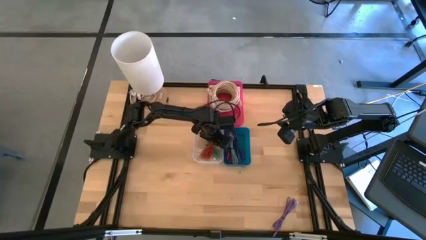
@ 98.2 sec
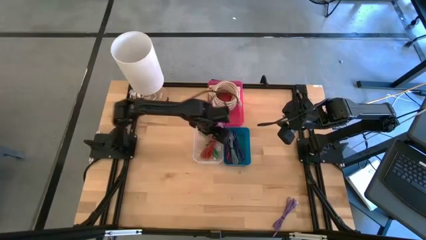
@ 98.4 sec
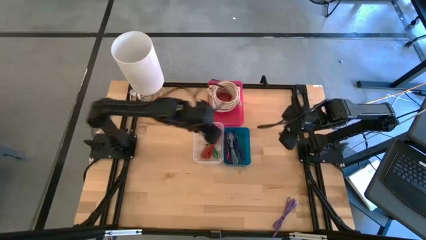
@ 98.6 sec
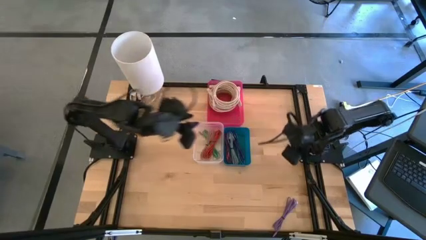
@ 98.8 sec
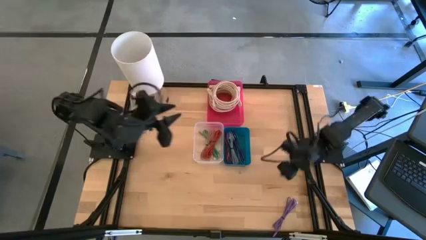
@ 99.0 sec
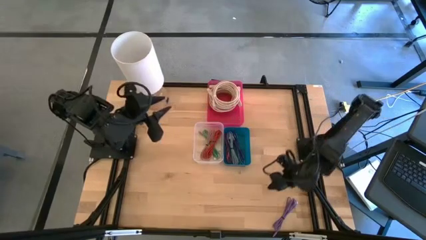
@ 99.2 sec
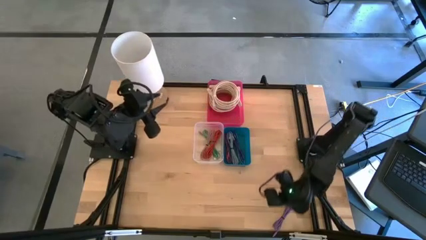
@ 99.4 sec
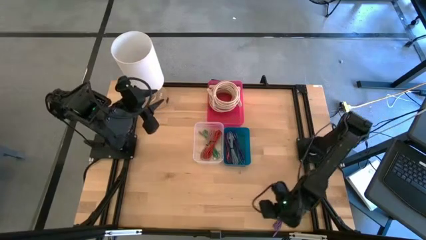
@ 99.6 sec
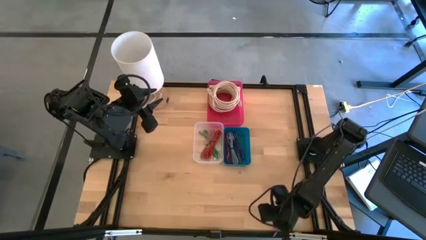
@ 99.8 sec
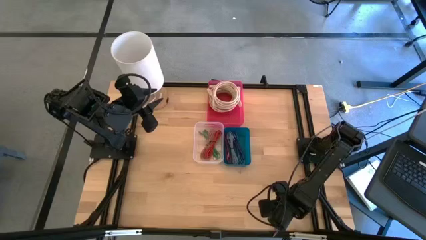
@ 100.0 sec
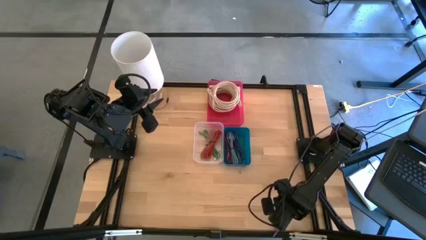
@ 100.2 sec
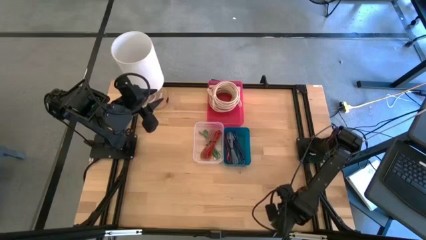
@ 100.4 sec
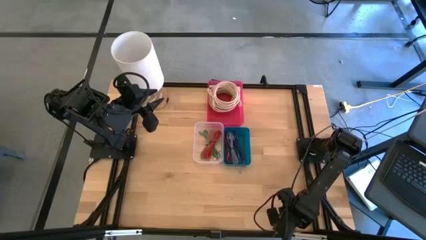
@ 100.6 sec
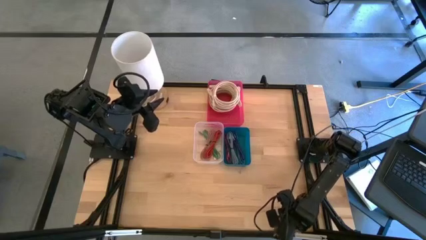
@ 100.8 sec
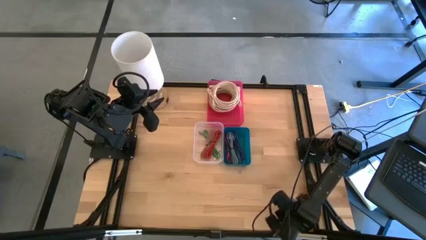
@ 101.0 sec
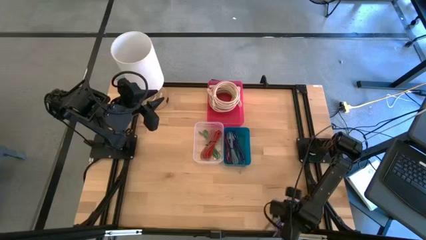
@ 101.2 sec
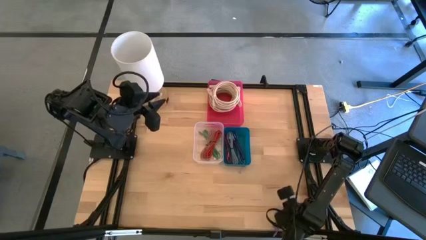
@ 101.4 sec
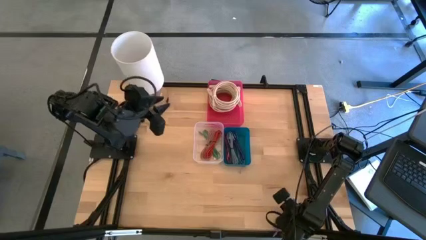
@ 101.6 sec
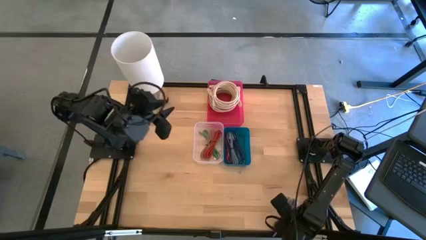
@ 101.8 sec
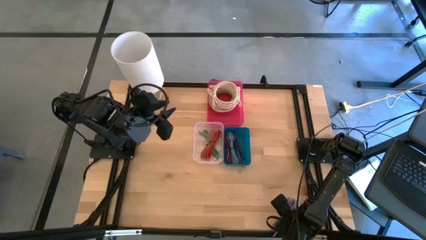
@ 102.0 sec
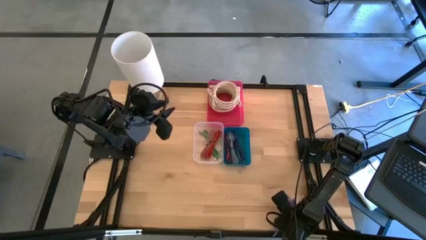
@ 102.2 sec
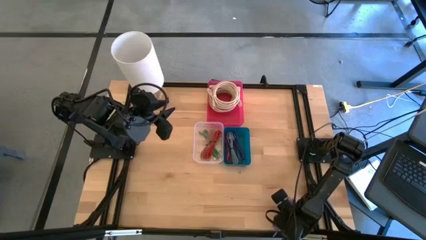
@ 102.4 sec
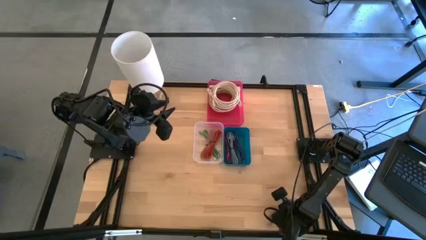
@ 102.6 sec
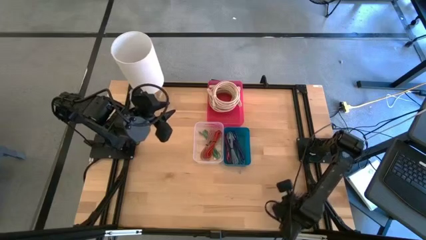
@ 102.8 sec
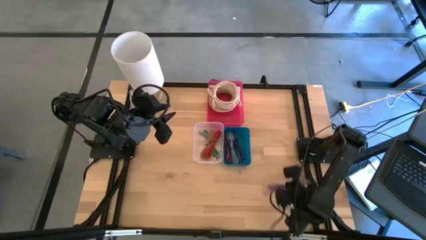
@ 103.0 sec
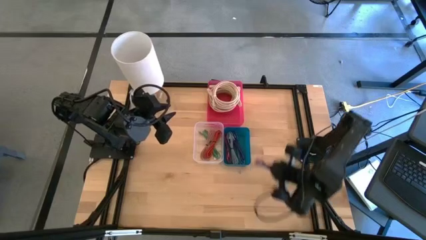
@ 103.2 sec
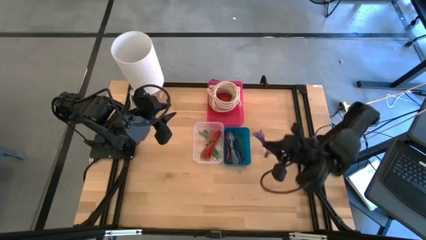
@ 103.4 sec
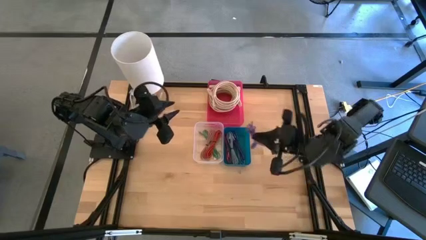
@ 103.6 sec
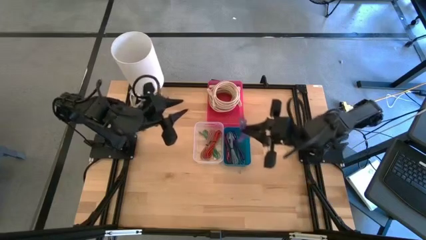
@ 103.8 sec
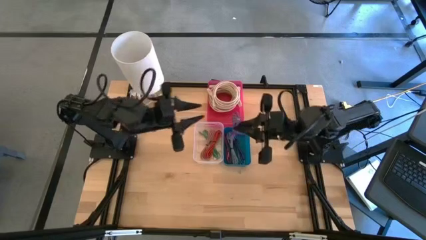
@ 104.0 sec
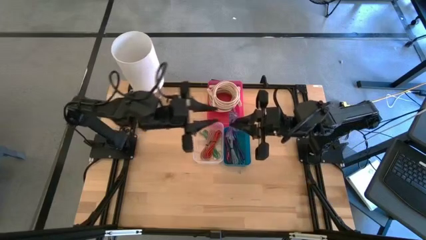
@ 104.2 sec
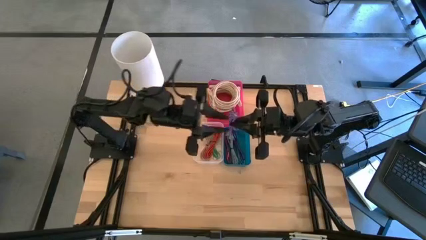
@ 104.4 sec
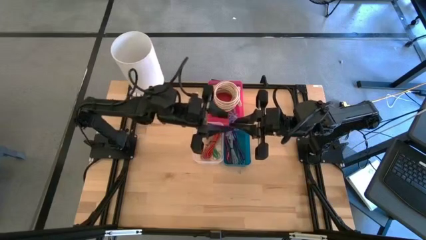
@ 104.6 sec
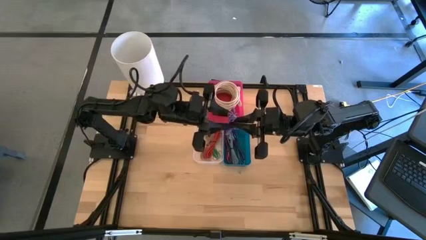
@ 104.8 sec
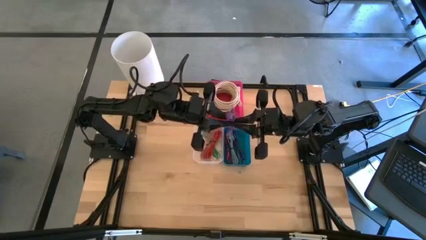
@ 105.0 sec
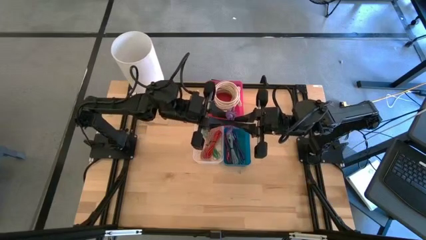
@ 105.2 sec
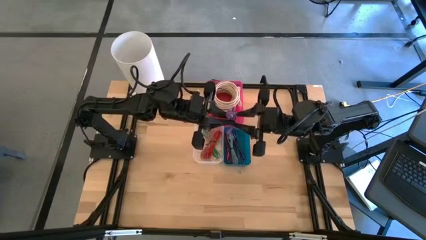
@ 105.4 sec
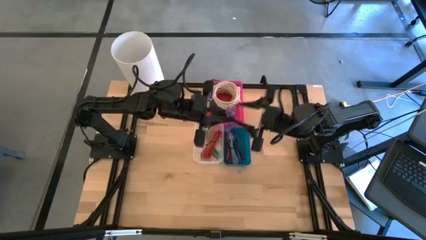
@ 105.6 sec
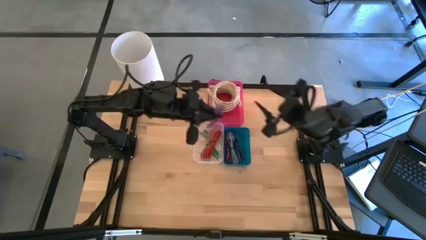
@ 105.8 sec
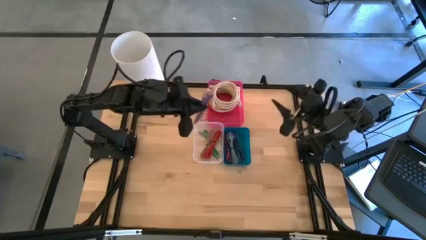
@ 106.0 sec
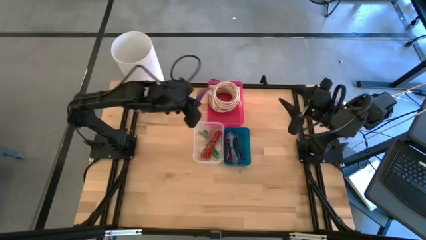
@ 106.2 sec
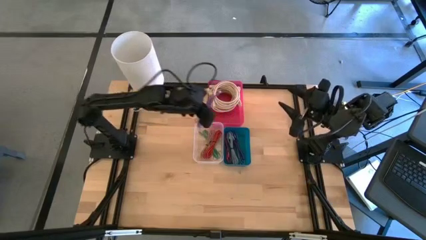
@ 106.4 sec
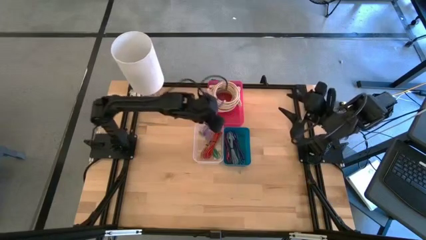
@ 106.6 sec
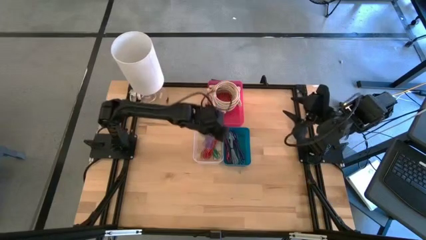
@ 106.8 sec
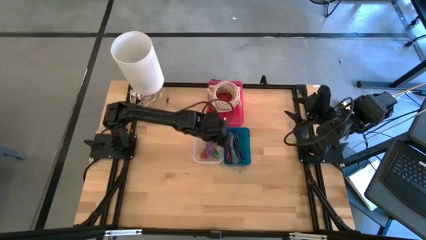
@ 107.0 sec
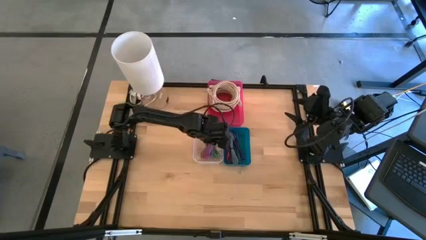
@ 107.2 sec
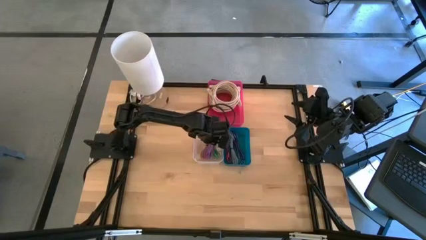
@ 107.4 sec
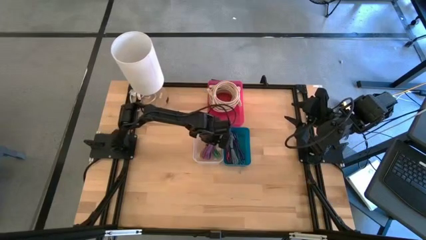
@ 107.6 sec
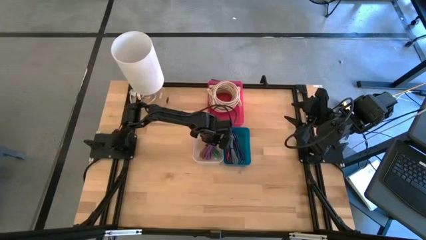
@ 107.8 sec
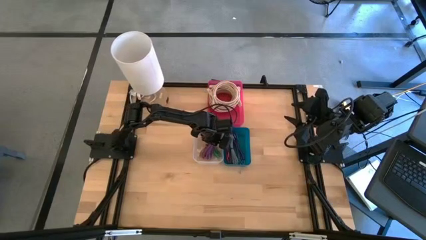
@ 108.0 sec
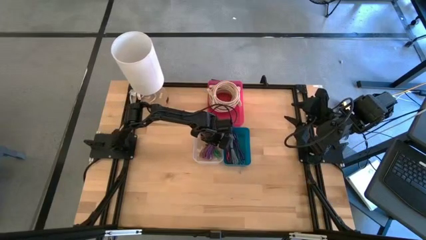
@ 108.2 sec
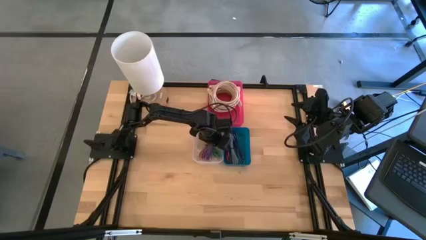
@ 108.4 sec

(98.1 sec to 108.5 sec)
Task: Pick & Place USB Port
Put the purple charger cable into the transparent bin

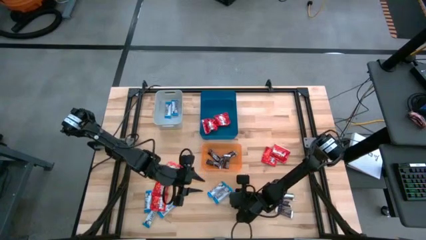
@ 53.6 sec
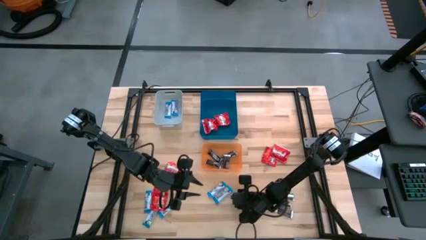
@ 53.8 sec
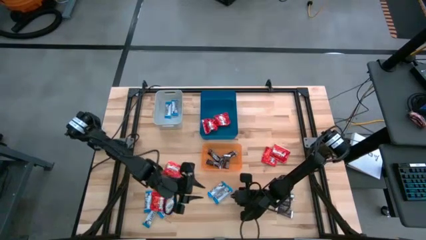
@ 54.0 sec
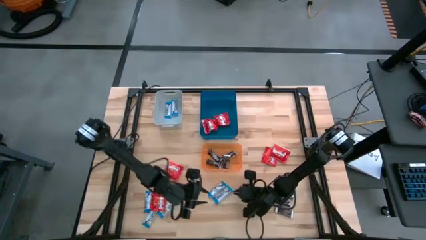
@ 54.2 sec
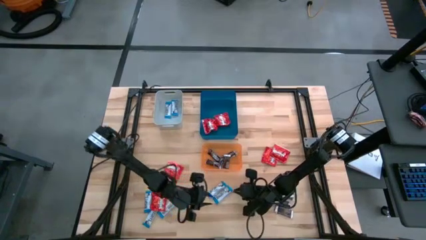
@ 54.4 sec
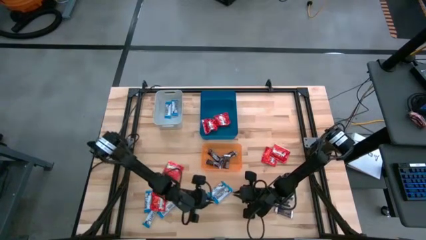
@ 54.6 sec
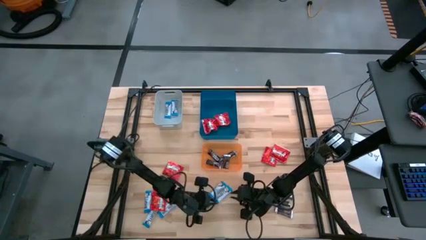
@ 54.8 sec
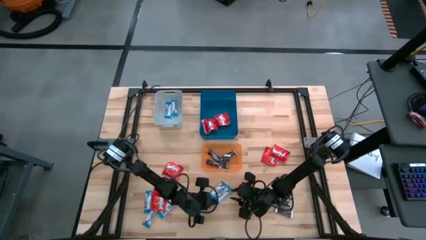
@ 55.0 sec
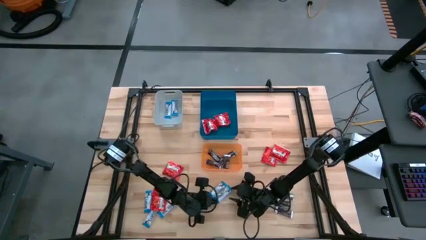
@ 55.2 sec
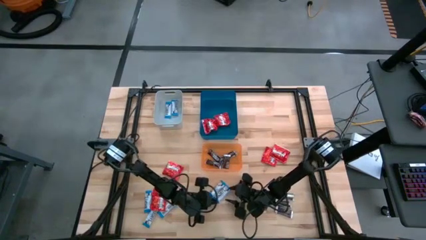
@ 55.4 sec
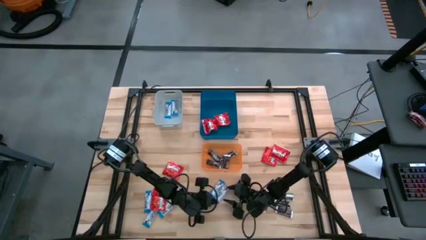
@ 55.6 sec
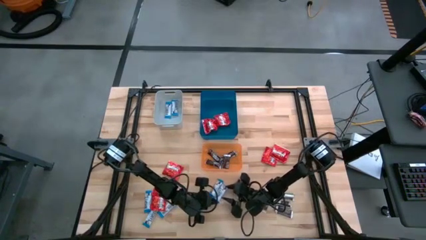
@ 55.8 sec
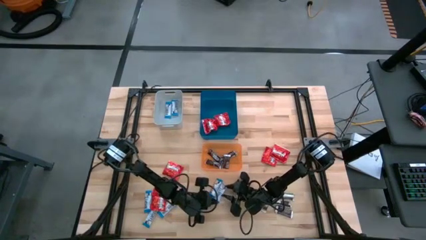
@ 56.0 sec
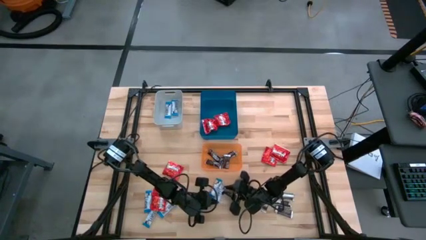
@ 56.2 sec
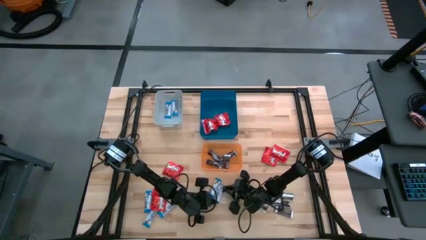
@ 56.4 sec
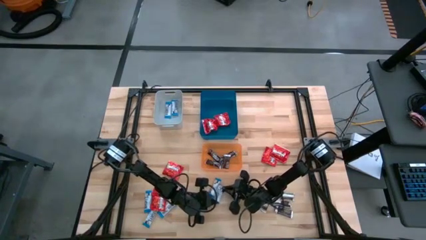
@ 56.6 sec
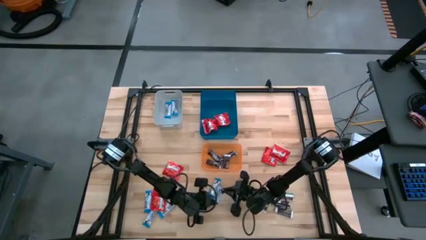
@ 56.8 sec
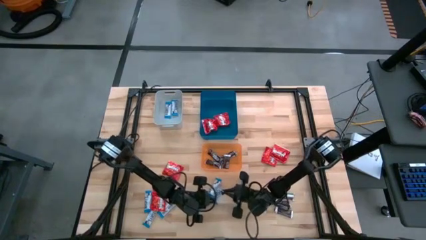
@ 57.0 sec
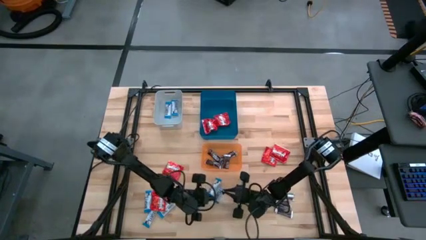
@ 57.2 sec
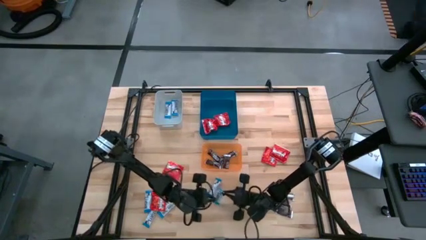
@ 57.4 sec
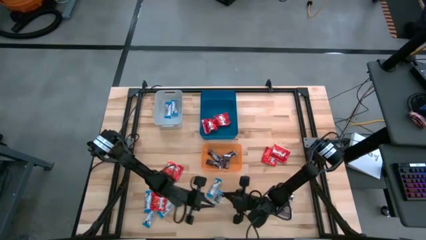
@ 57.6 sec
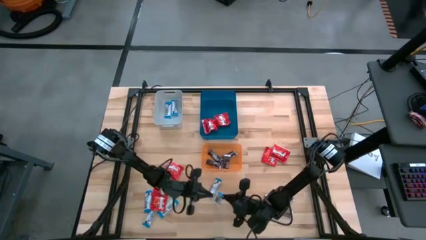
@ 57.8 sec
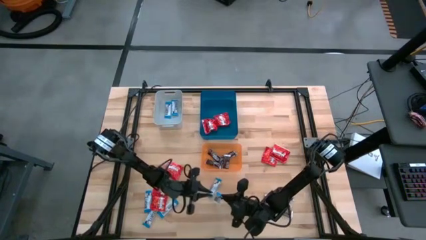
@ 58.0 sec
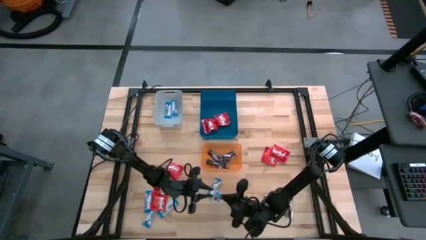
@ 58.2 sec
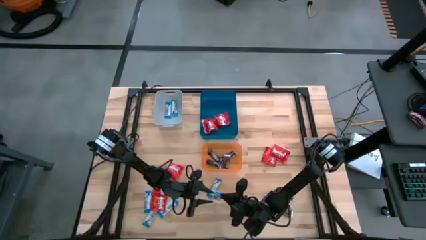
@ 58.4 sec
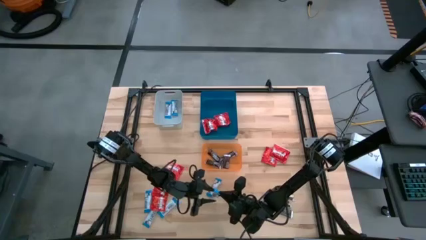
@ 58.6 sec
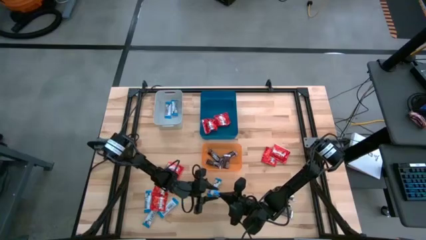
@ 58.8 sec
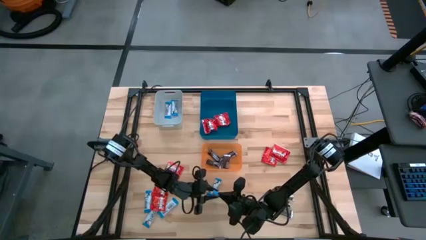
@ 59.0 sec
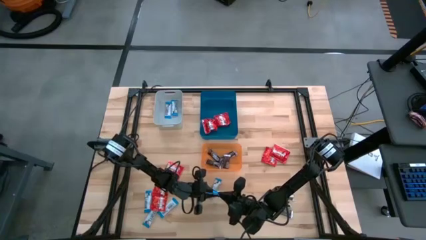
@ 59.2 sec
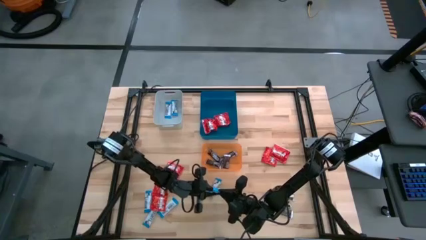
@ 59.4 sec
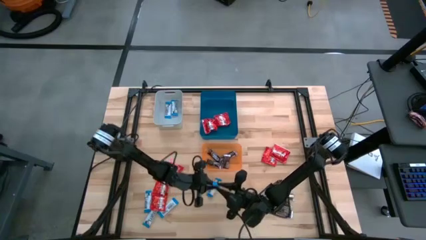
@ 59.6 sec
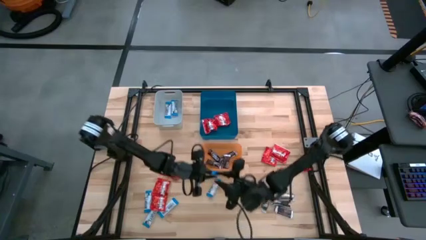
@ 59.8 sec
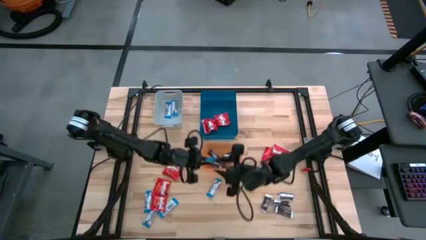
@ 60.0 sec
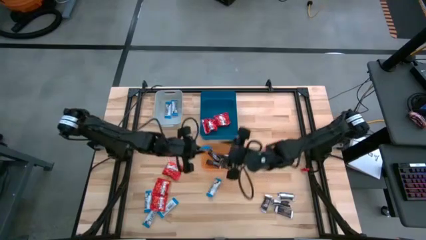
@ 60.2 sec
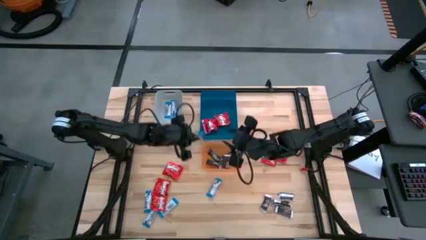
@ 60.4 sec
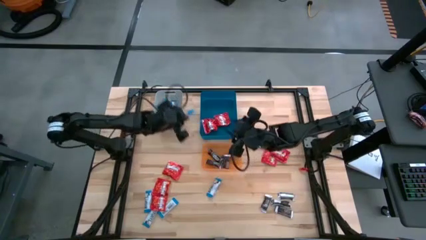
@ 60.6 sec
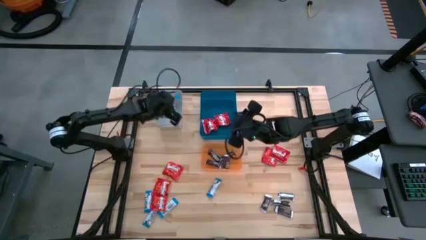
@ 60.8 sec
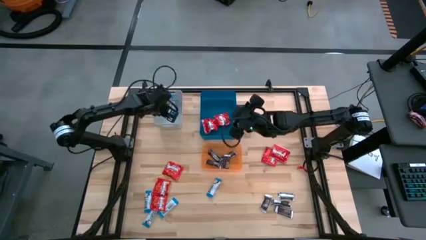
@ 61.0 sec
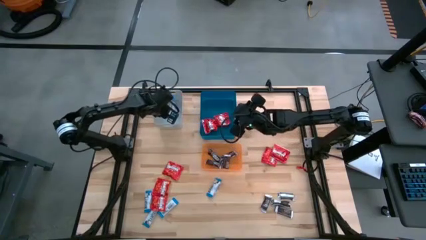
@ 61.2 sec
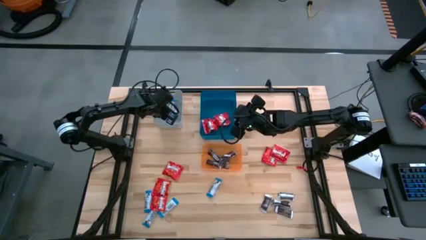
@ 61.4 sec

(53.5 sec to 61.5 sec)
Task: Sort candy
Put the blue chocolate bar into the gray bin
